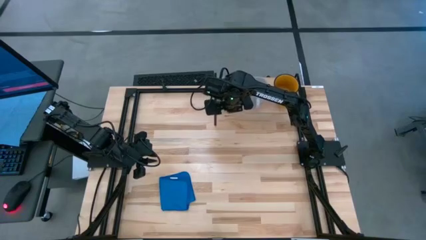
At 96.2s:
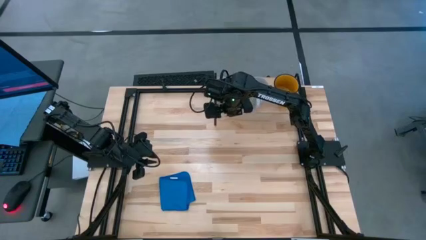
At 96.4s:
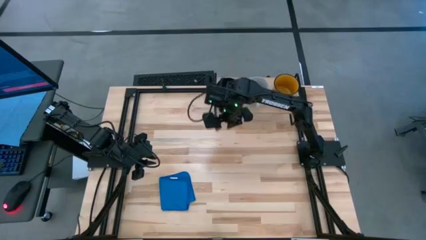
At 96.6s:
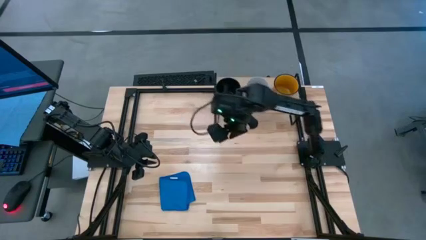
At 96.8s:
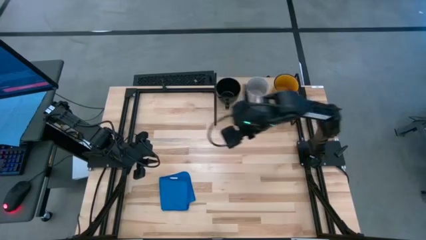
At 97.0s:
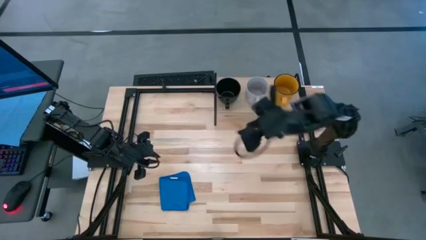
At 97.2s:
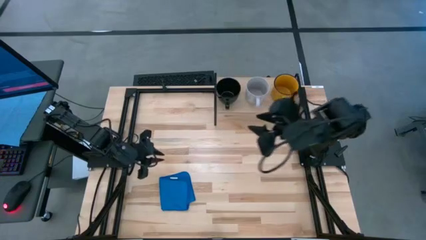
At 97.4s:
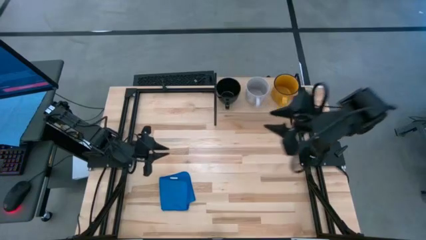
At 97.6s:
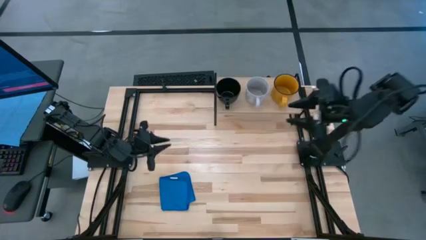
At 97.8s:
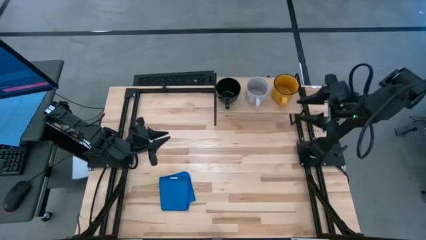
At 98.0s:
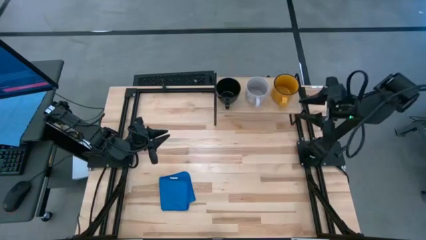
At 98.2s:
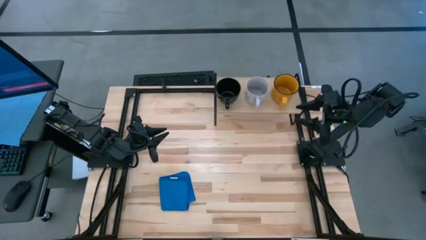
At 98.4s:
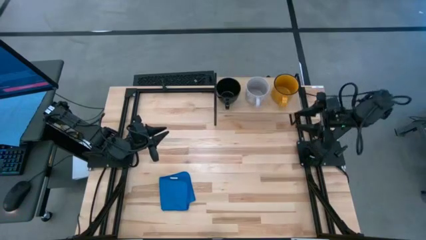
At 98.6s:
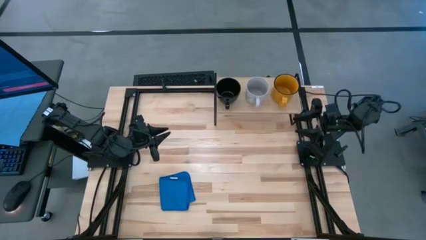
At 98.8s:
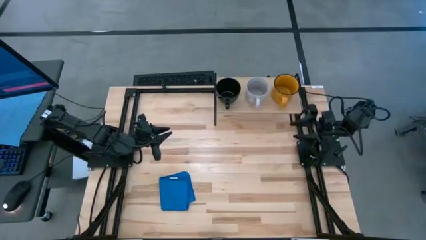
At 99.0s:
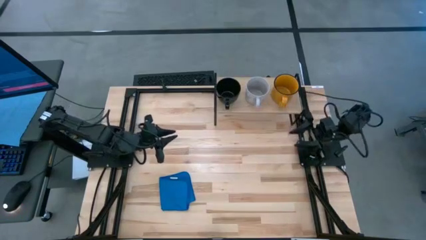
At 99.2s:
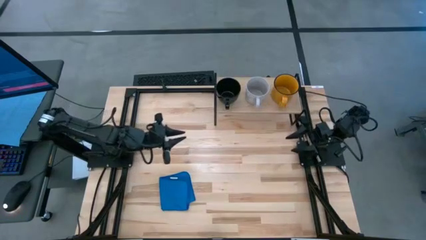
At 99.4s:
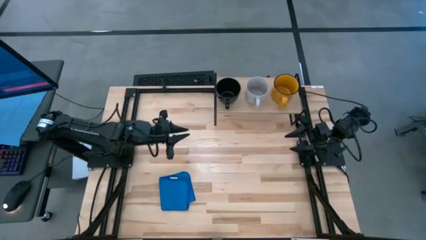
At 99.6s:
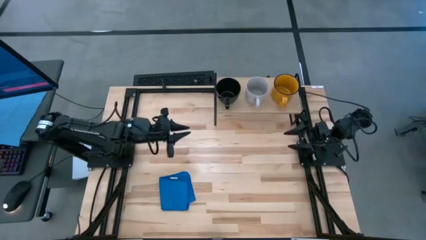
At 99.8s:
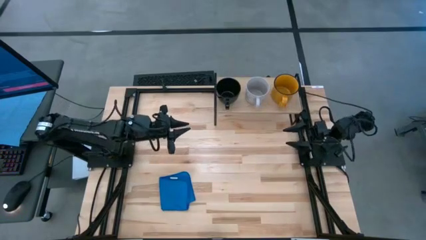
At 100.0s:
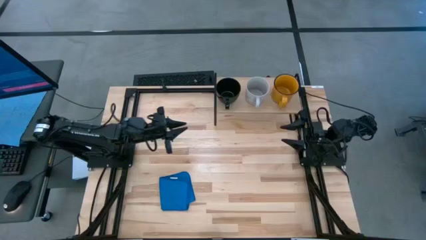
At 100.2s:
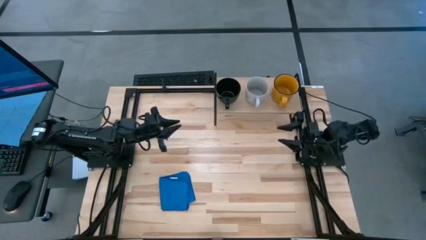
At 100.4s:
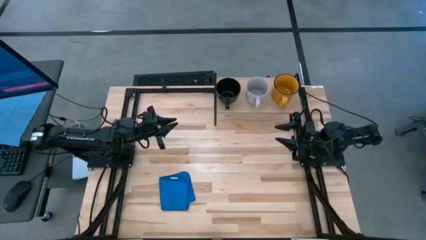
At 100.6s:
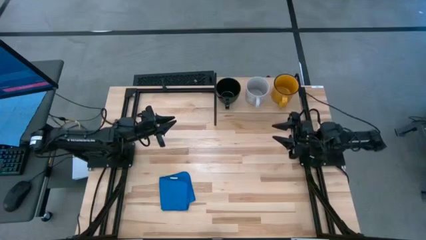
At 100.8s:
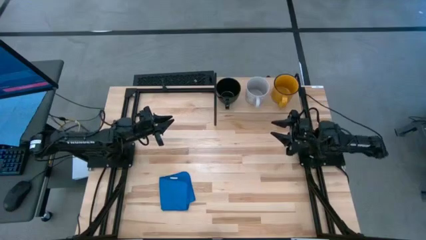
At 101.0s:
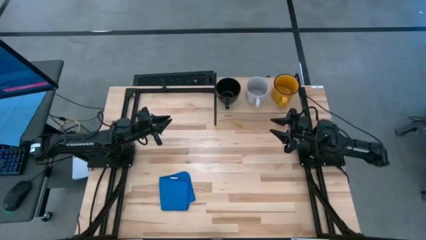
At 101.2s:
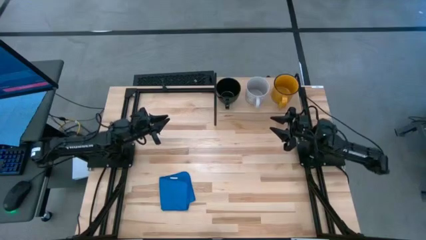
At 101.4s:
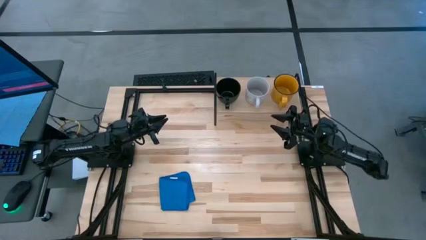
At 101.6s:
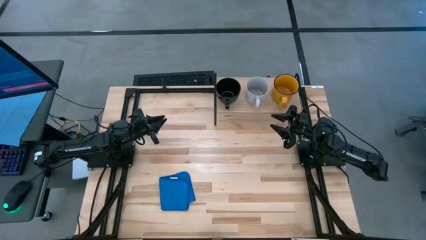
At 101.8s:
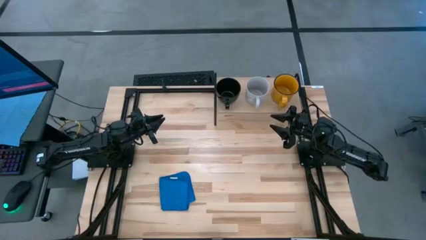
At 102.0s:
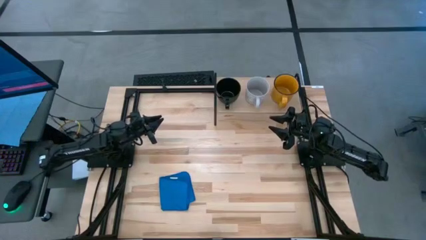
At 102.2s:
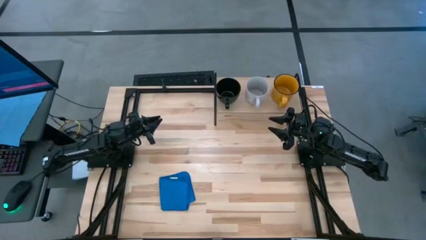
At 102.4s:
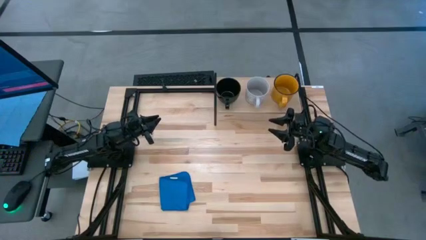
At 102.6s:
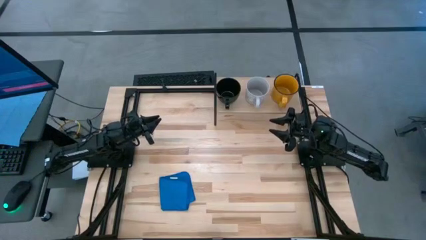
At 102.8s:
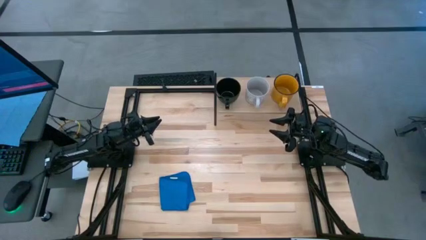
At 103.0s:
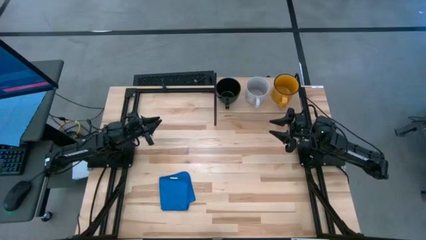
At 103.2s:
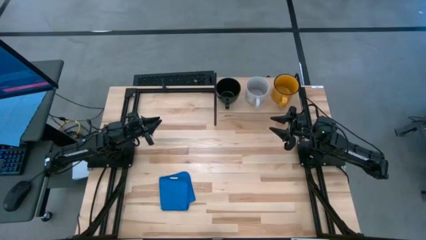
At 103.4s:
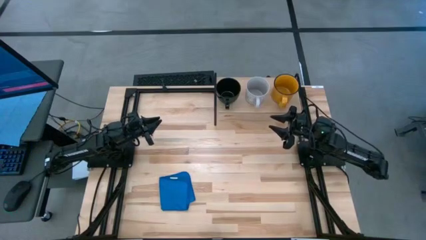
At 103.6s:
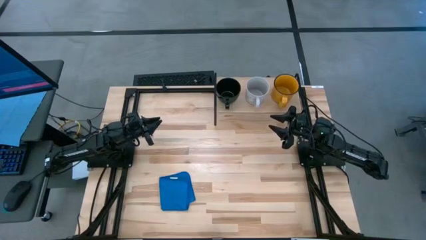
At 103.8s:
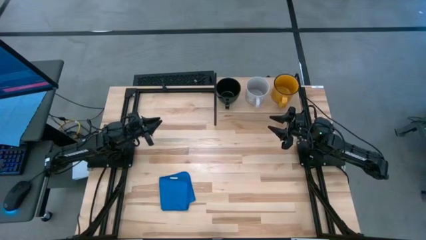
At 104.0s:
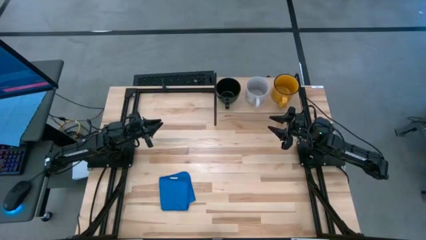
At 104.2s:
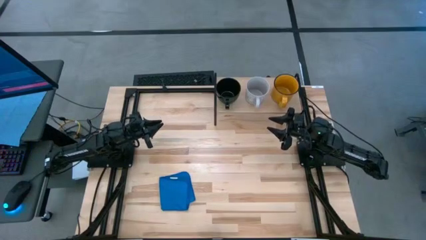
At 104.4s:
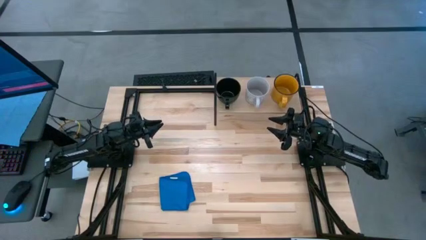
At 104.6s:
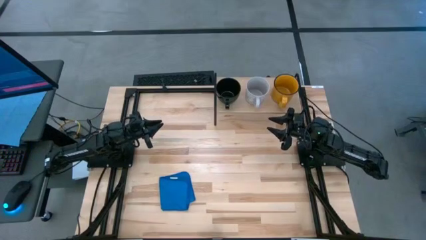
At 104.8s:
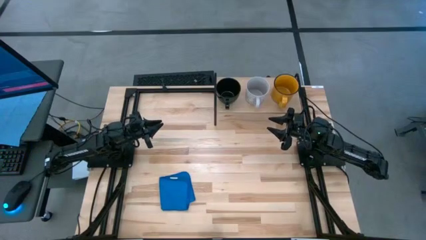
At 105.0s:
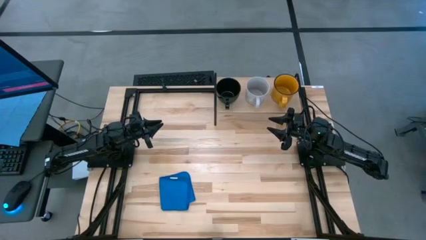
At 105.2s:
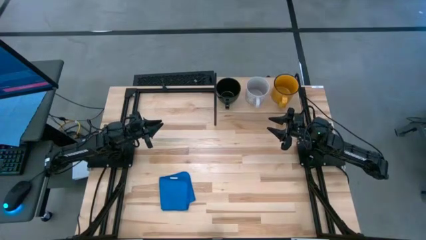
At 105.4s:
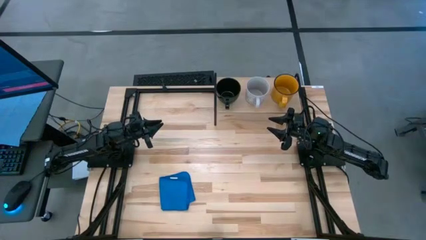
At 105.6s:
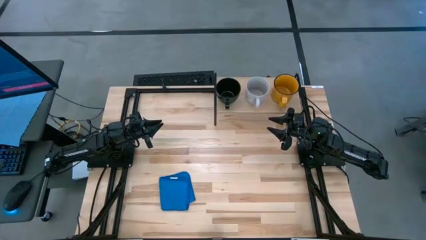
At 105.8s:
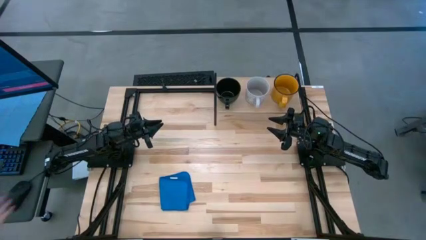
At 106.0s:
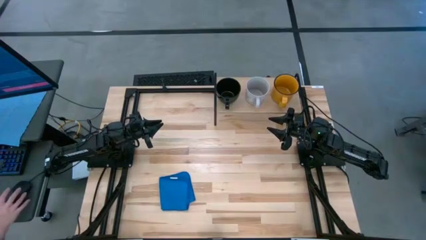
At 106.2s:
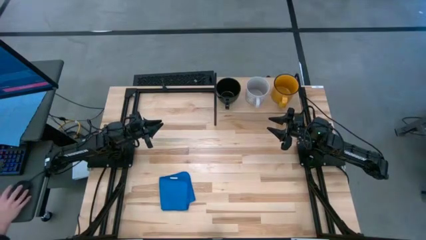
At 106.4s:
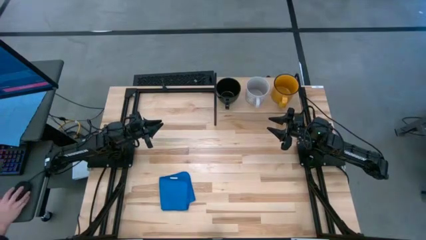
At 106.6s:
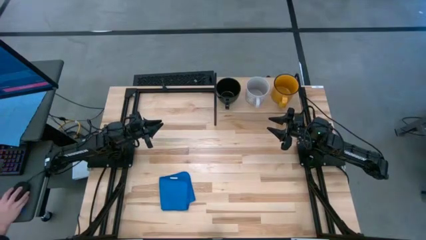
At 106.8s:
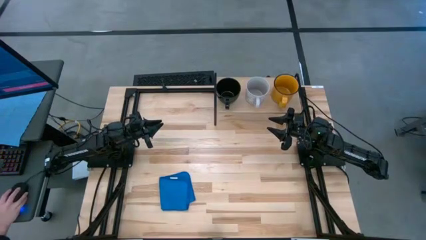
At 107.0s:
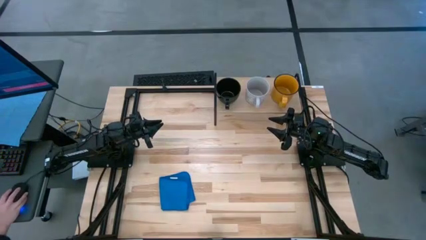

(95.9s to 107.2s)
Task: Stack small to large cups/mugs on shelf
Return to Home Position

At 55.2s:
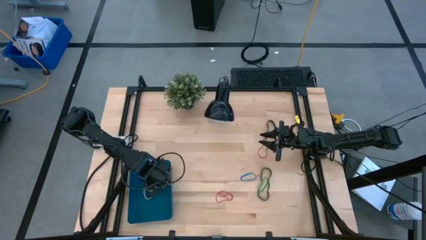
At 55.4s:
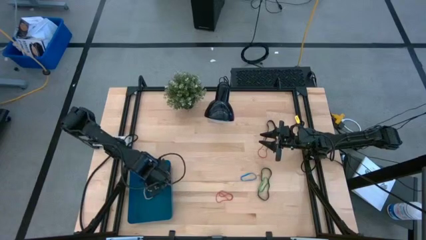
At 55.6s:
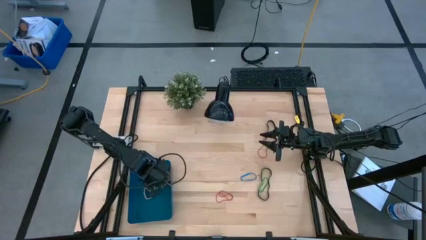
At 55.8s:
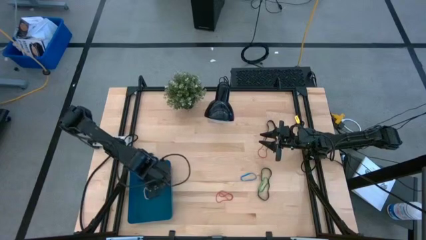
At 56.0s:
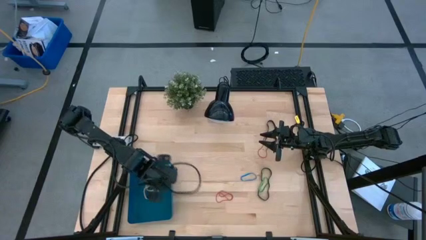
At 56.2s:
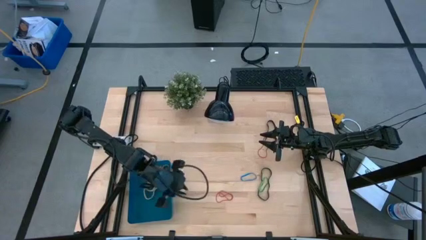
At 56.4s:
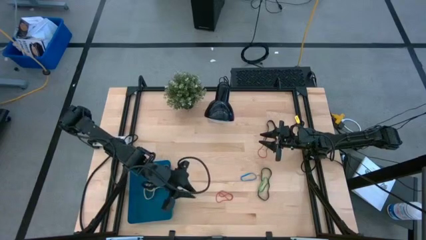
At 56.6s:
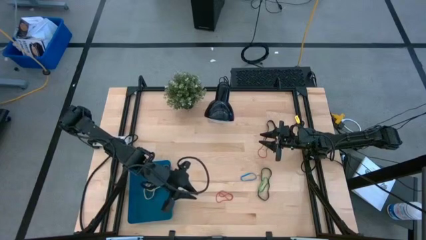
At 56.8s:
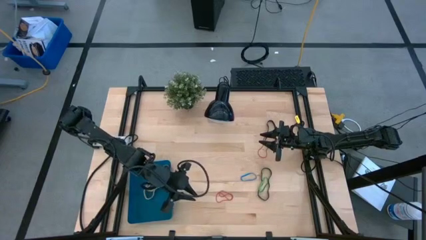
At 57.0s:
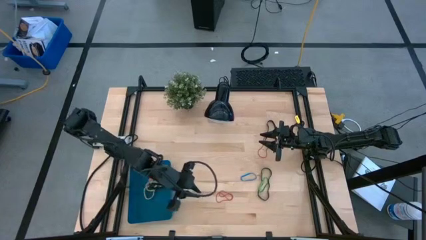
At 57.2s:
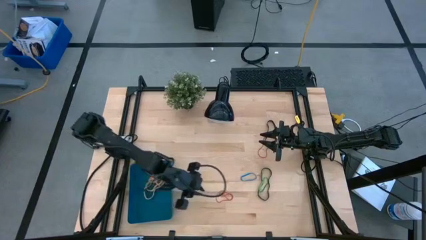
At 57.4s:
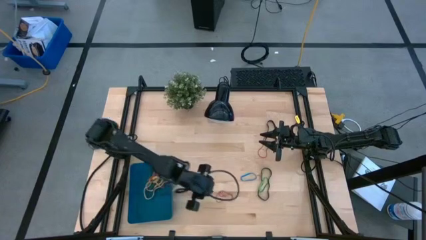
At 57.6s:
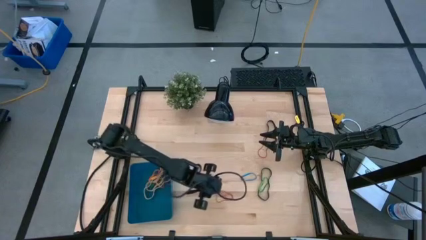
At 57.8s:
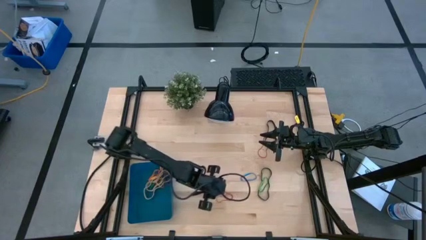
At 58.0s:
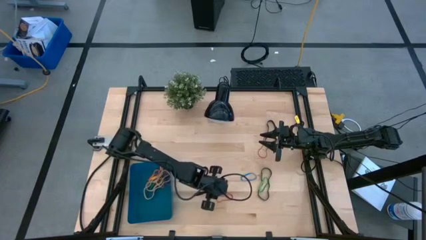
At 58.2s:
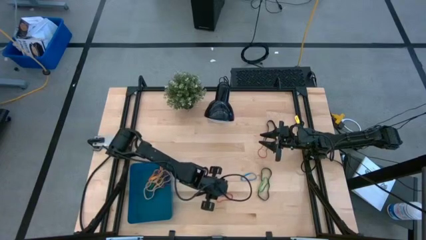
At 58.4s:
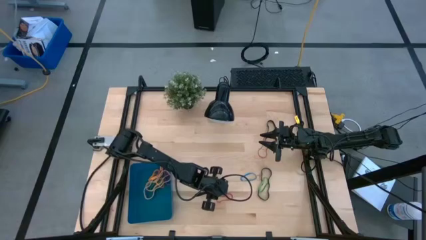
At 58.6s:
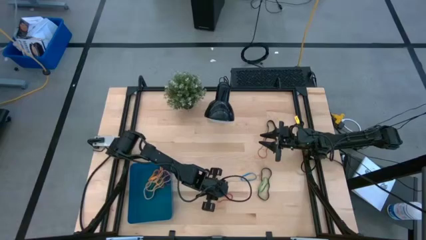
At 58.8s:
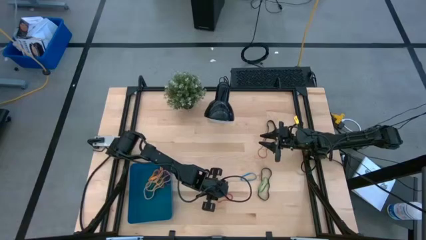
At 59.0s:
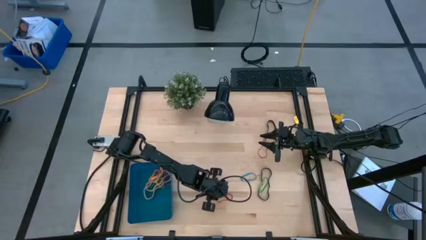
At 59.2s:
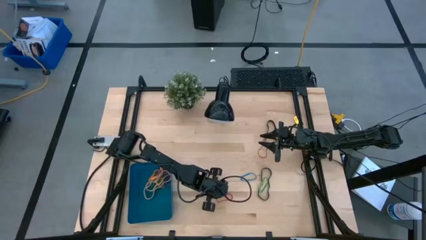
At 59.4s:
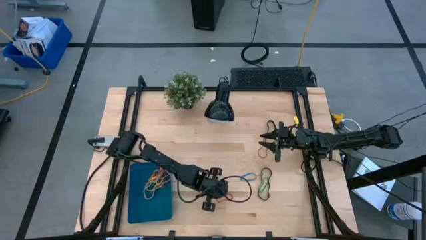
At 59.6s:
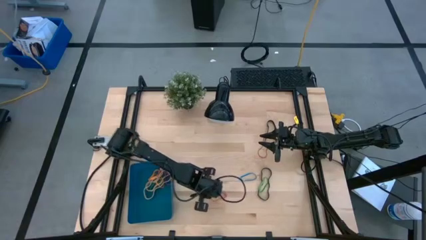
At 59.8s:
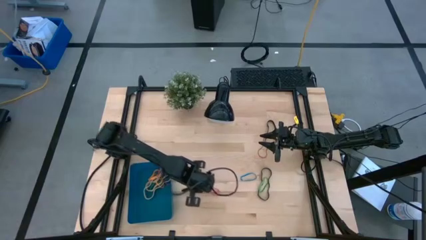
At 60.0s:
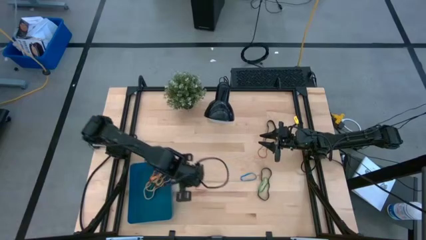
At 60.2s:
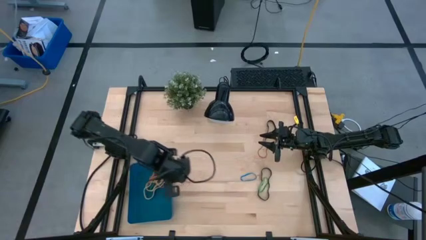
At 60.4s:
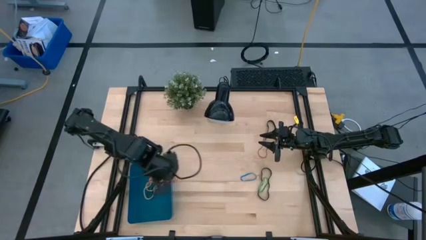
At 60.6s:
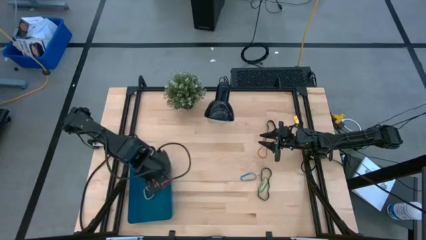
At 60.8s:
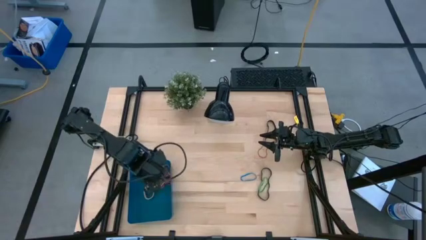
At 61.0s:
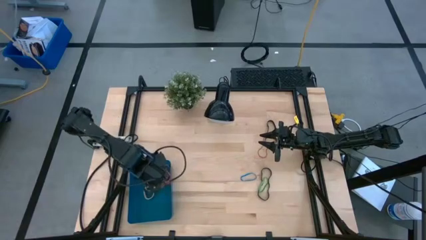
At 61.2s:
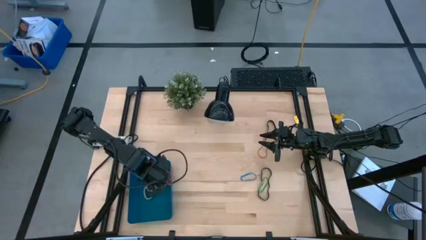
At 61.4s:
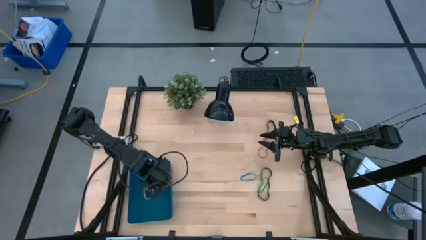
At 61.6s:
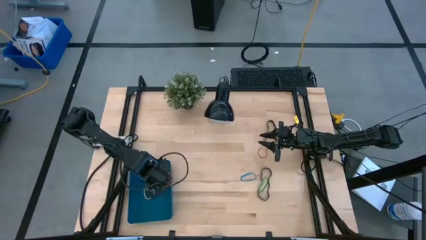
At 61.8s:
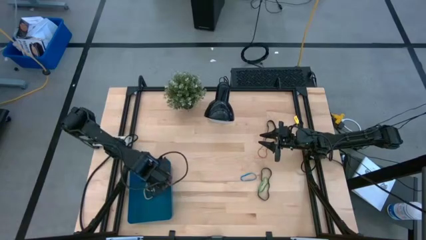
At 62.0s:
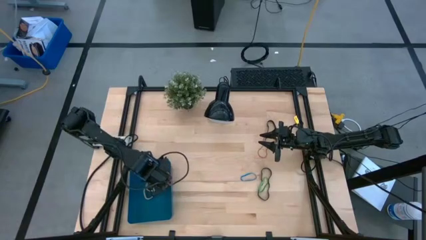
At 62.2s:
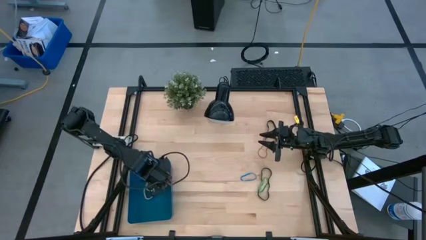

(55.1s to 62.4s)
Task: Pick and place rubber bands into bin
Put the bottom red rubber band into the blue bin
